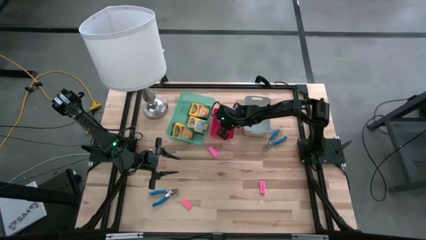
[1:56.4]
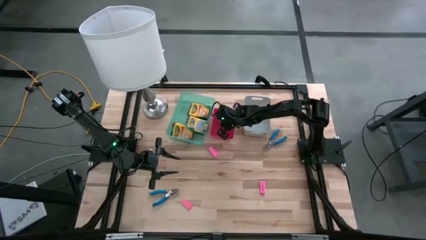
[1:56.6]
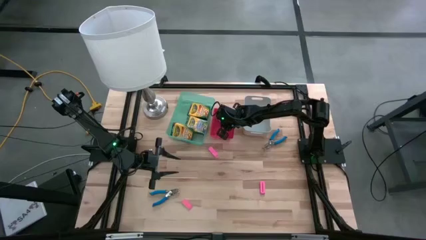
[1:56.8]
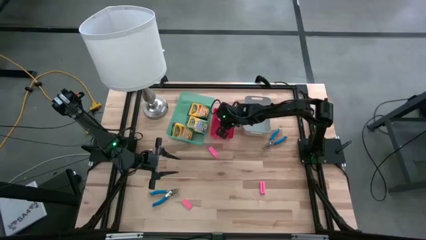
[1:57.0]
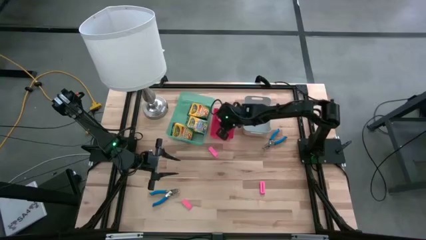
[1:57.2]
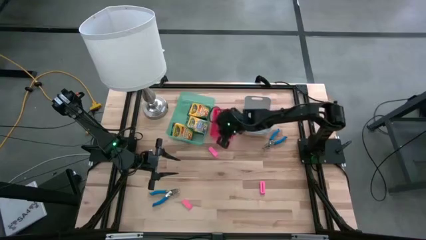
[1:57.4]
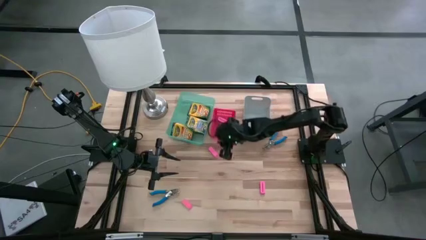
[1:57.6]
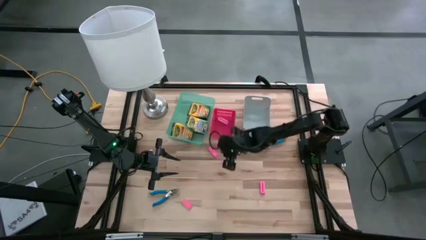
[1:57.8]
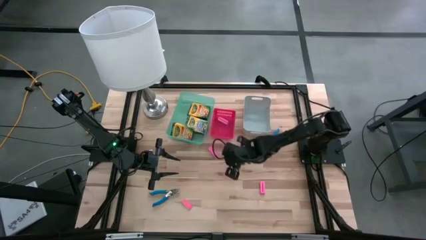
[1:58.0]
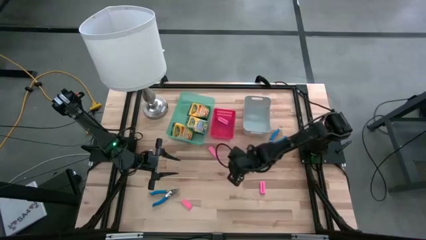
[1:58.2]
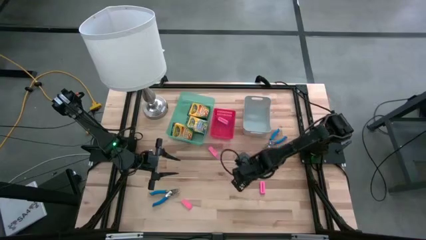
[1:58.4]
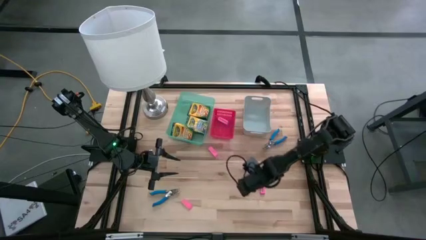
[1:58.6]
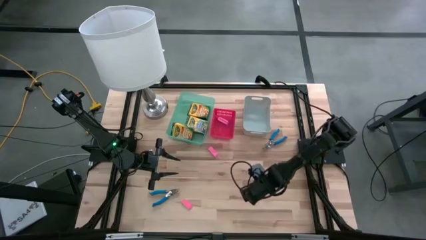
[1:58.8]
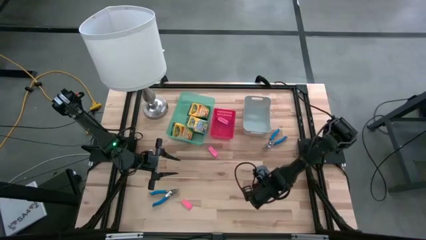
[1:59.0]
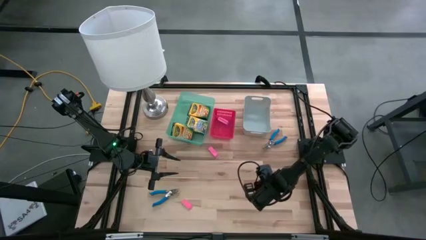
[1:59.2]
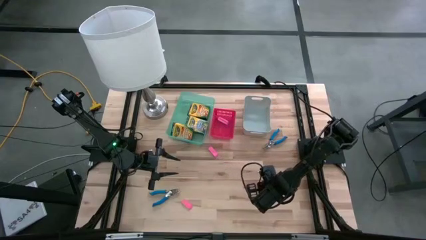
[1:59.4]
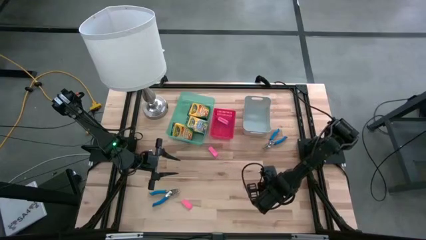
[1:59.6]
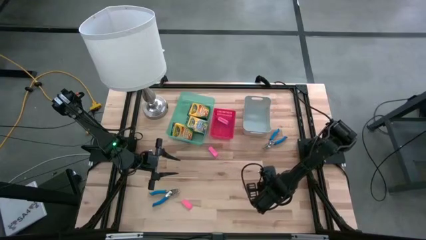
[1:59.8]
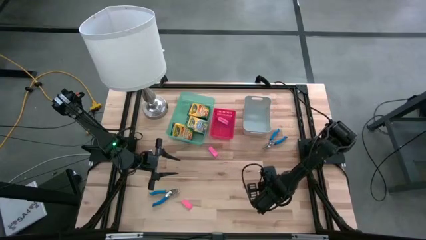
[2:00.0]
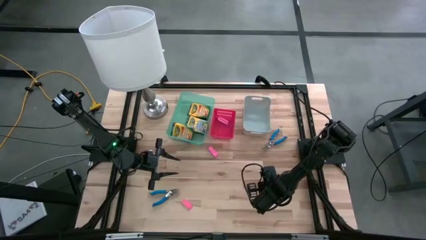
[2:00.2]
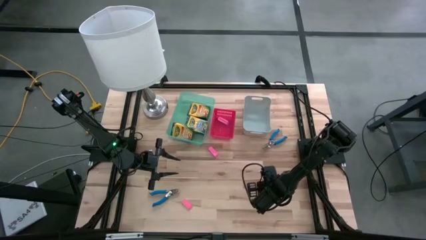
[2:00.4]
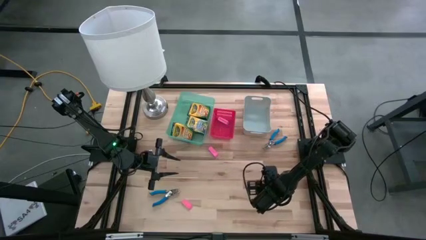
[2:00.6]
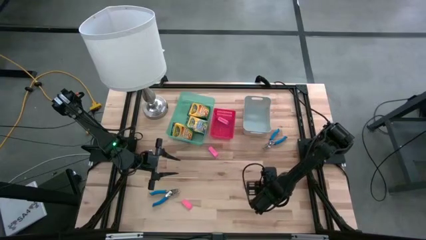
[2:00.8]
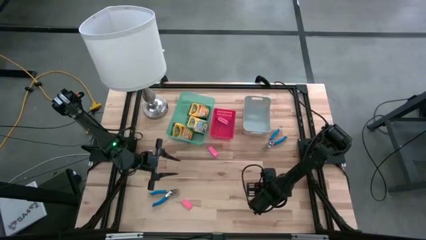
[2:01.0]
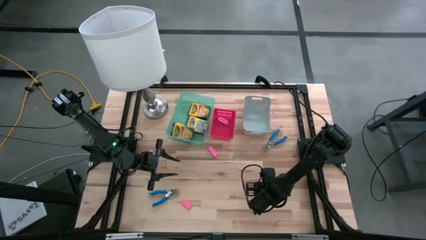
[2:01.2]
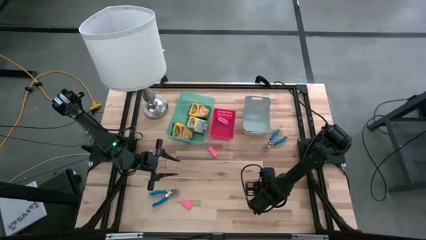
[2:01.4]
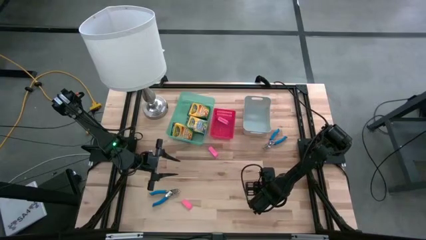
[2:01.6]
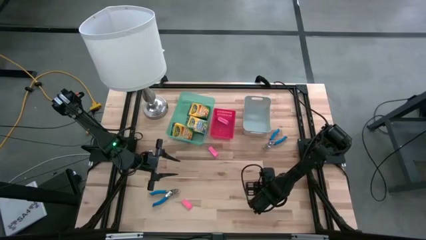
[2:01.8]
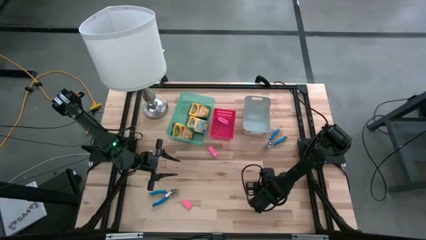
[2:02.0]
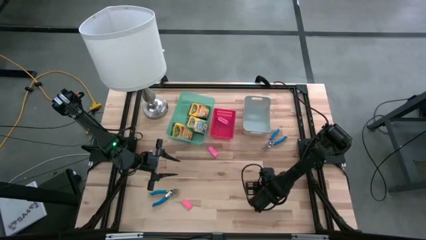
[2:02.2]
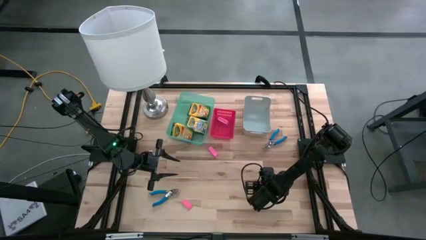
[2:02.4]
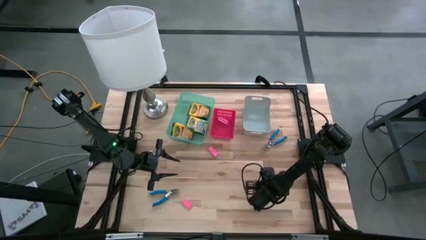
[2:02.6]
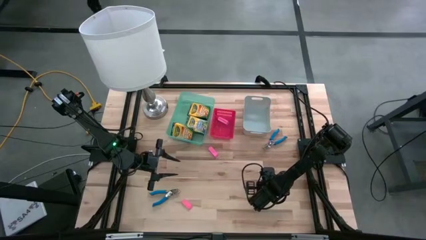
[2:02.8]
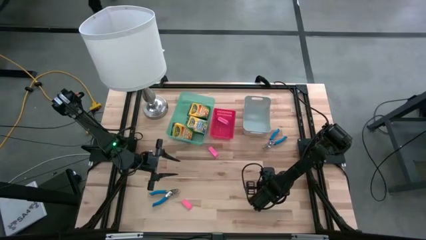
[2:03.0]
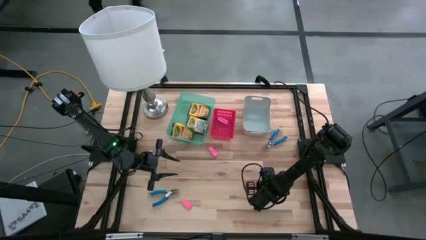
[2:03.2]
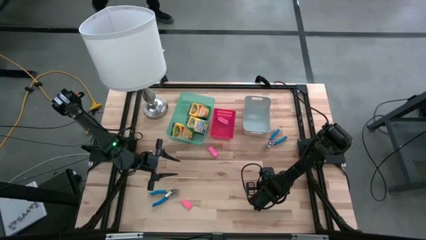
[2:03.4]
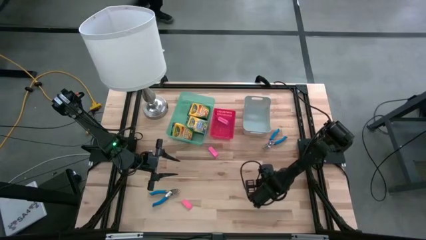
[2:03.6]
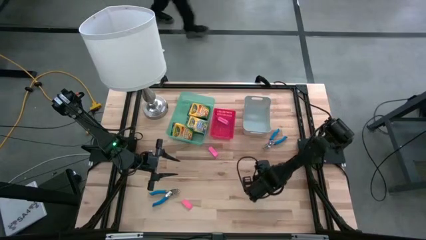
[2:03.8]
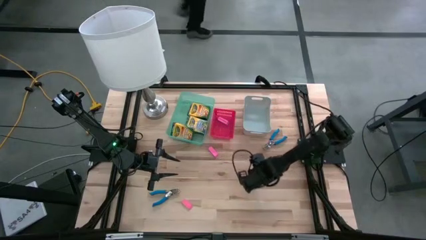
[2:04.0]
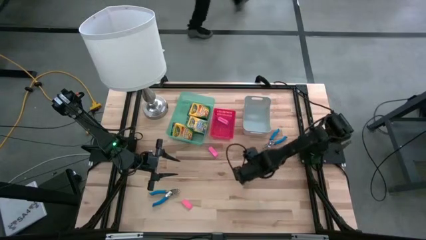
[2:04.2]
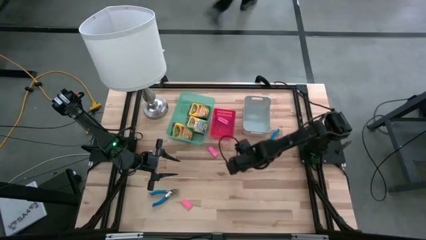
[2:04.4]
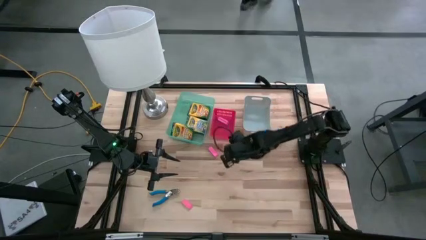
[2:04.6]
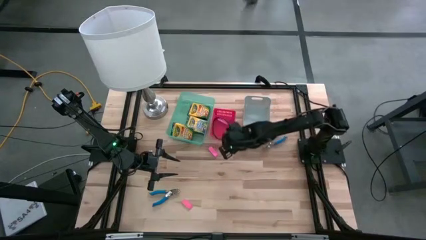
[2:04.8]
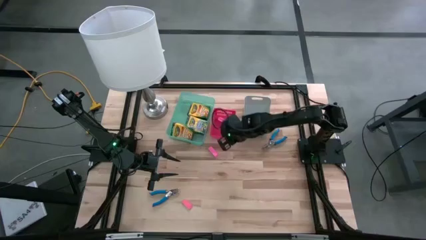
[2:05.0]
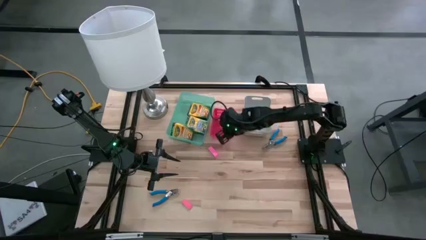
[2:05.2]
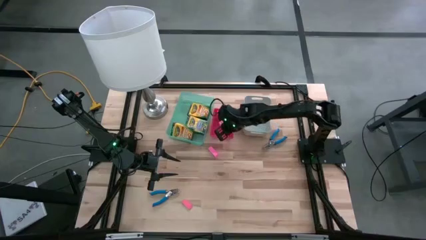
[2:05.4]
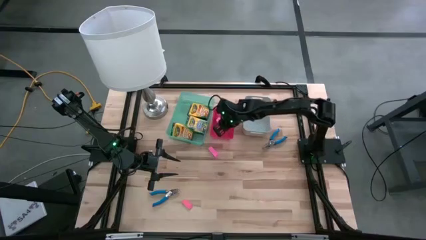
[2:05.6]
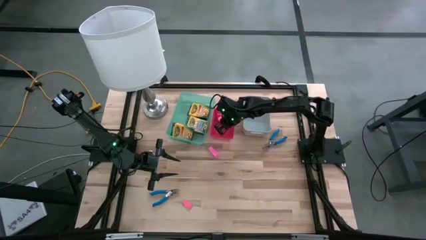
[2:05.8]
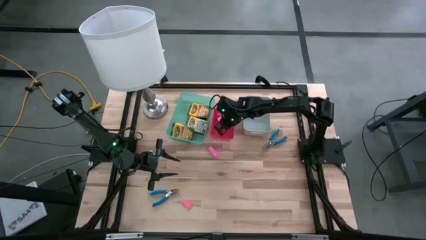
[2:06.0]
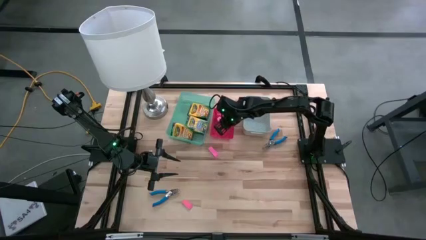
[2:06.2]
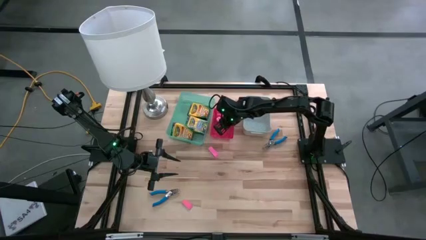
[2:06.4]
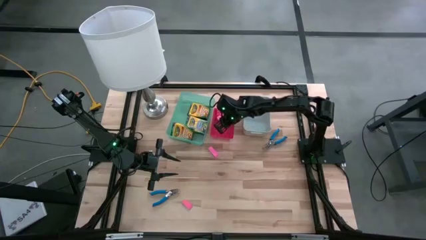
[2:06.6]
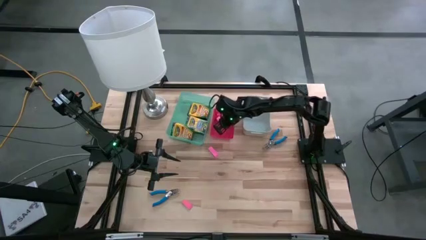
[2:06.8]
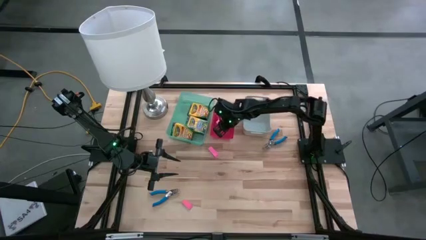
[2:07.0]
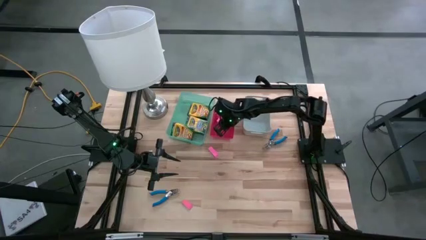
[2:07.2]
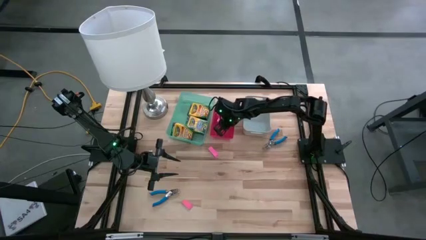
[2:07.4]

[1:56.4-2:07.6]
Task: Pick & Place School Supplies
Put the pink eraser into the red bin

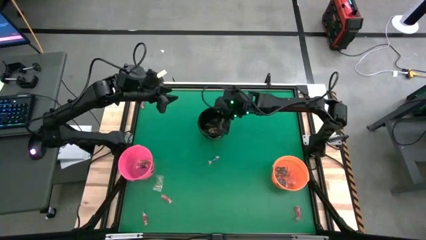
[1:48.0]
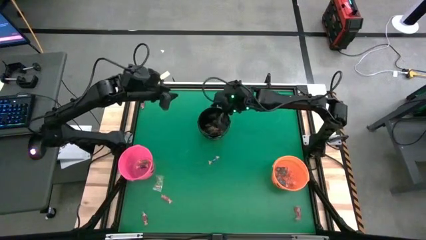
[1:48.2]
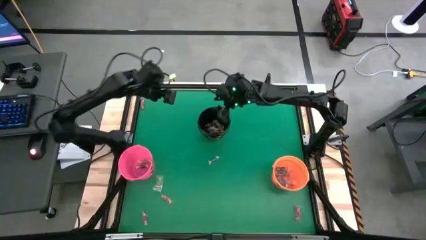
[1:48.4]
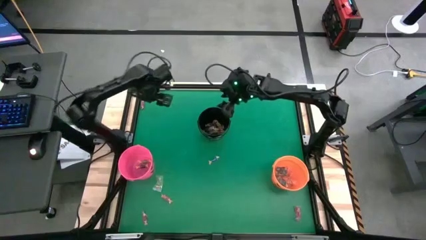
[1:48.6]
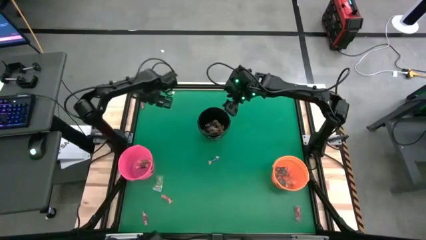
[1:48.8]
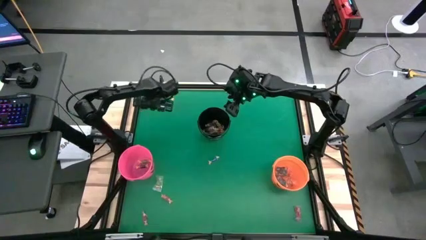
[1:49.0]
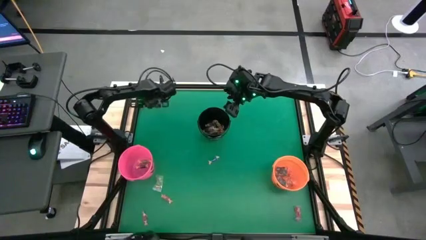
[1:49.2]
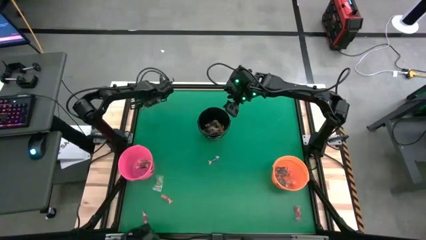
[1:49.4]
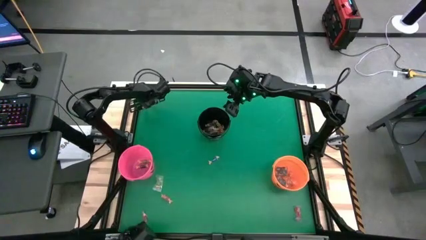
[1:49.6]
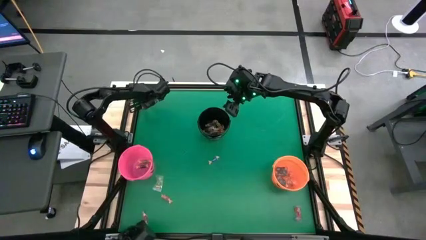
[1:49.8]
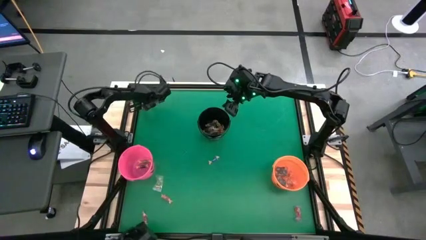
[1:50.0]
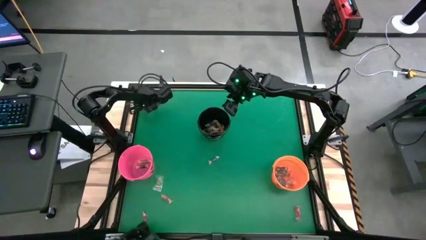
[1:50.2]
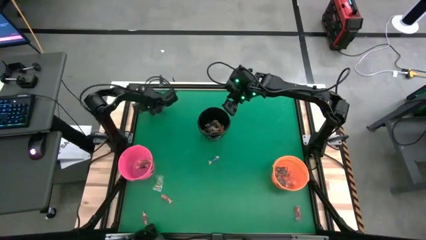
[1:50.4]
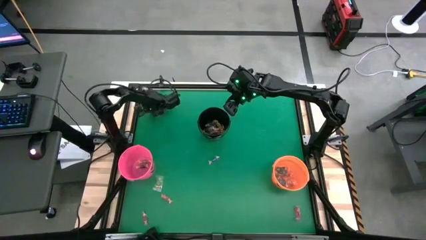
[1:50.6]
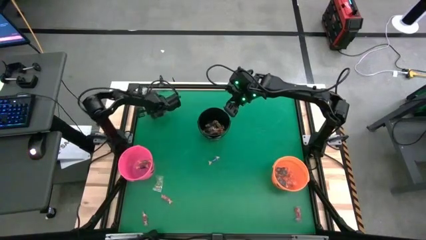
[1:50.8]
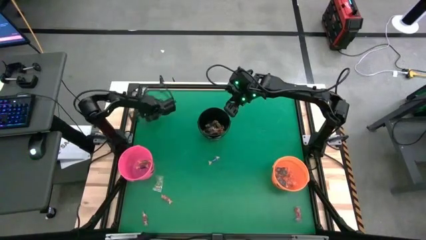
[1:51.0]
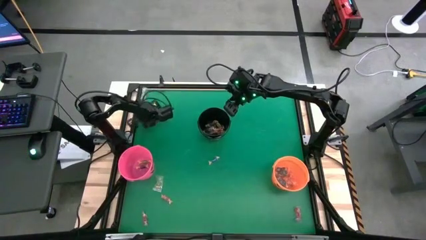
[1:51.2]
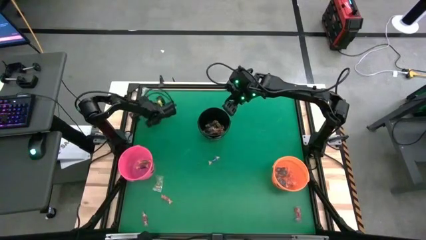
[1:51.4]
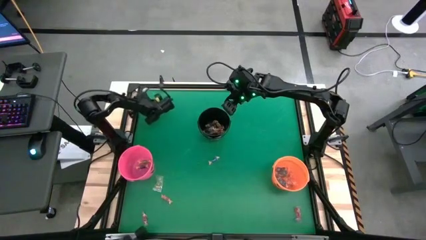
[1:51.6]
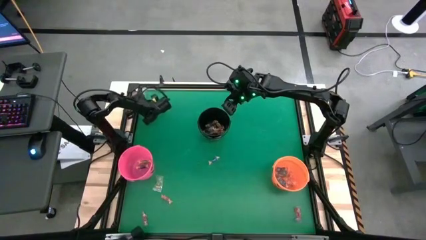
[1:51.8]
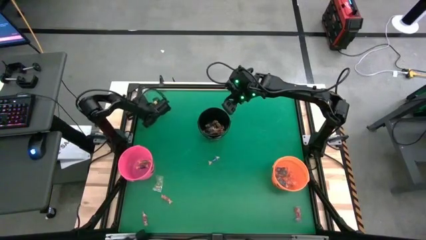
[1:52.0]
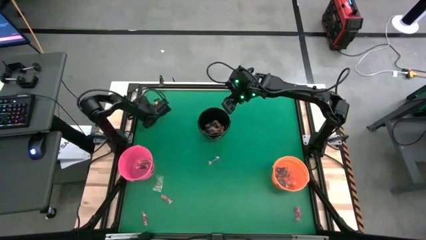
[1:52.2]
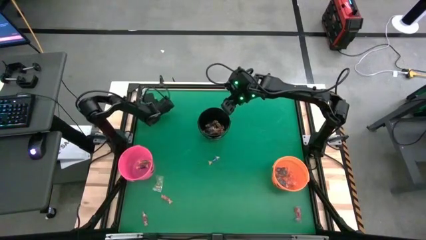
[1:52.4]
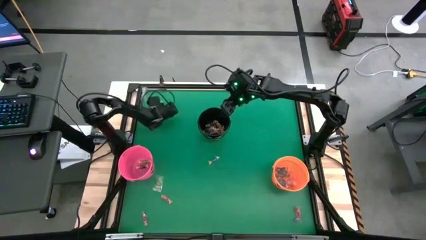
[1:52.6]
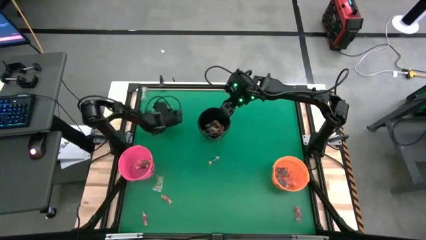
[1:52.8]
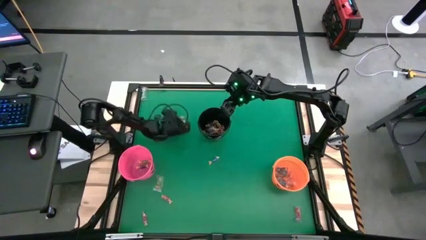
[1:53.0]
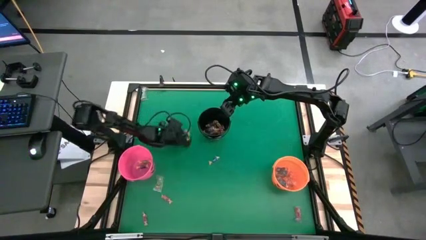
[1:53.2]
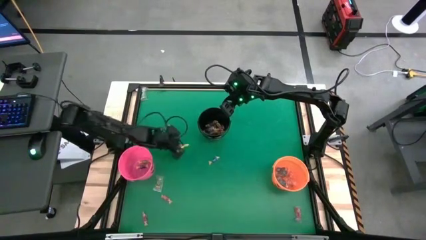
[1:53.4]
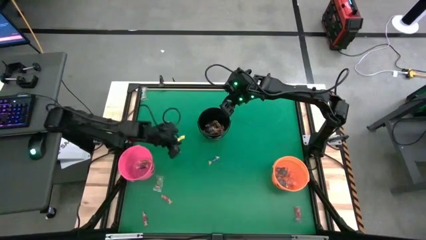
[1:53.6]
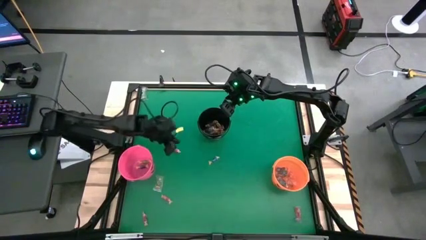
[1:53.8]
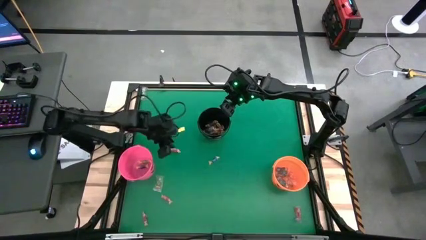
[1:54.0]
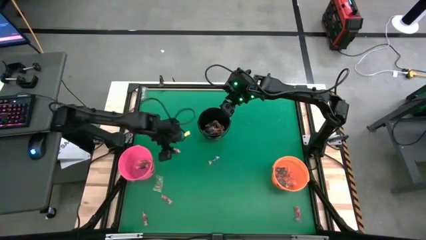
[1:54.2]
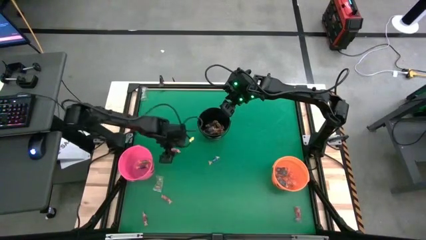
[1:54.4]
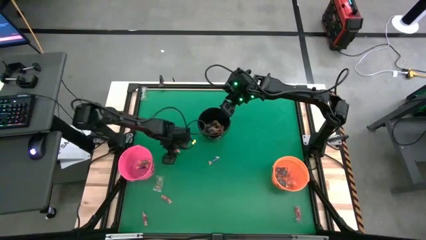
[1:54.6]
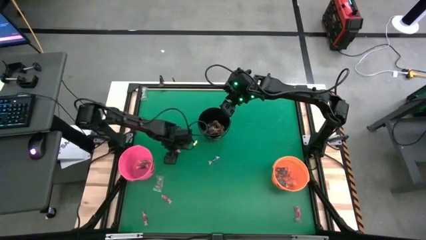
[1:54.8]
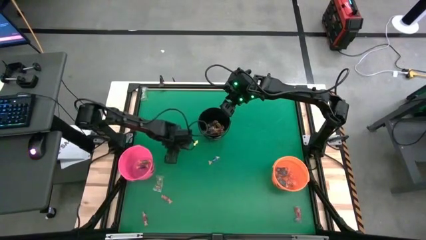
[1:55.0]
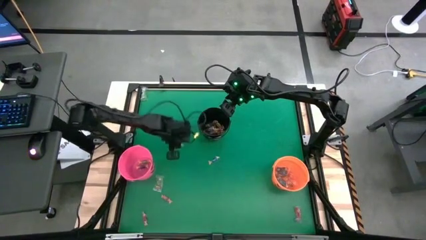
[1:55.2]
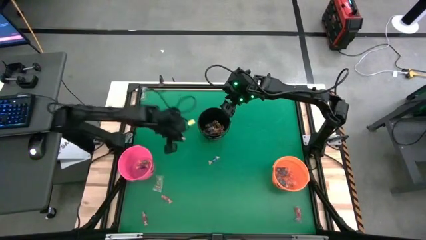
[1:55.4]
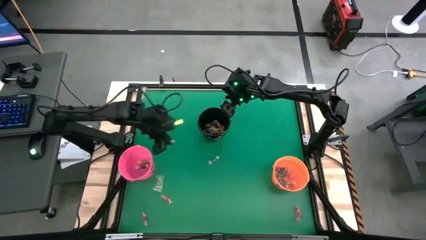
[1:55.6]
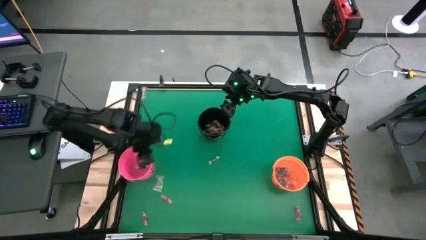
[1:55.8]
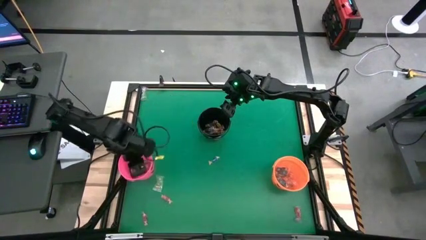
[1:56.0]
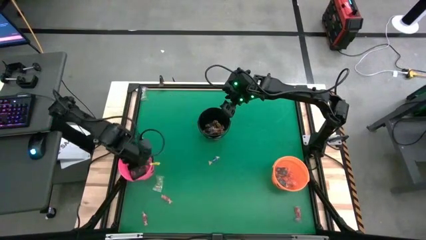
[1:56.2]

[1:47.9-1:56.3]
Task: Sort candy by brand, put in halloween buckets
Put the red candy into the pink bucket
